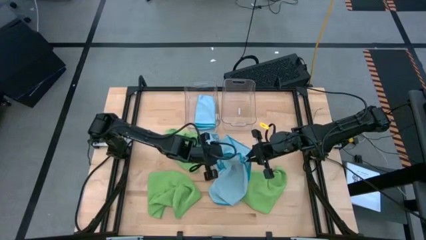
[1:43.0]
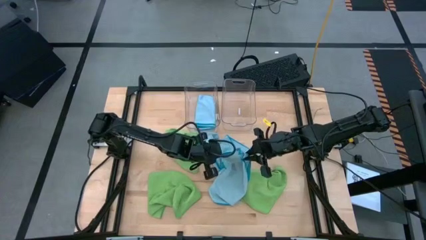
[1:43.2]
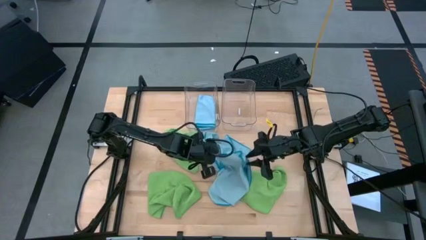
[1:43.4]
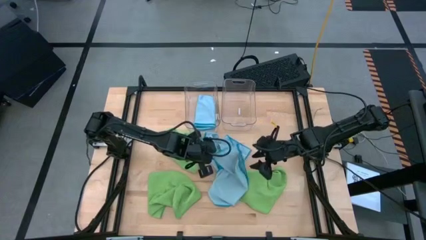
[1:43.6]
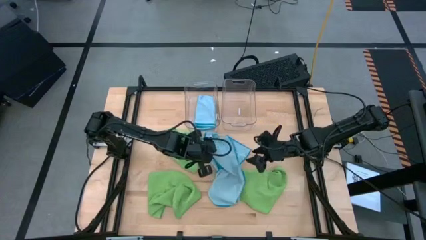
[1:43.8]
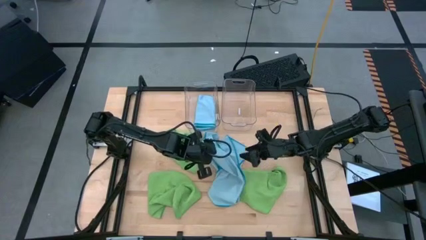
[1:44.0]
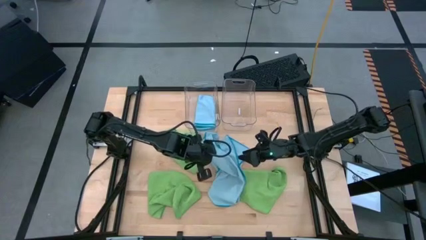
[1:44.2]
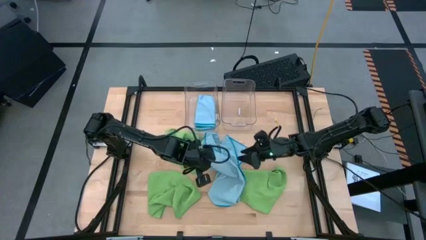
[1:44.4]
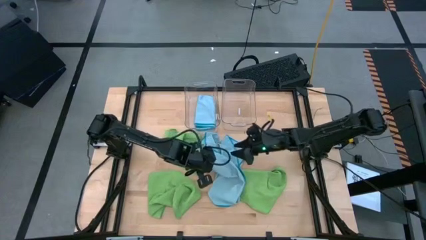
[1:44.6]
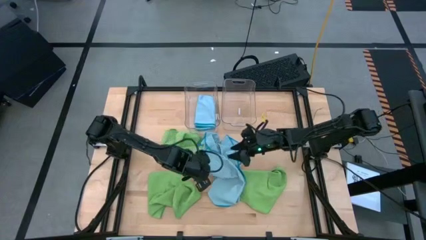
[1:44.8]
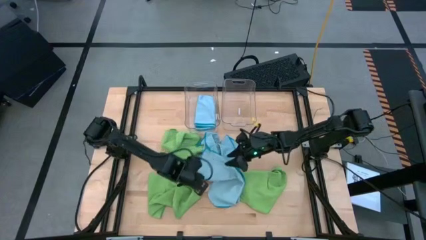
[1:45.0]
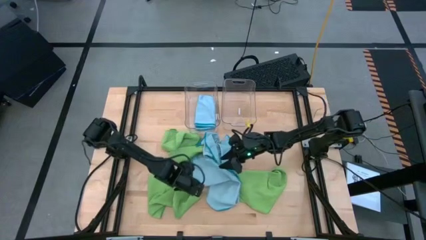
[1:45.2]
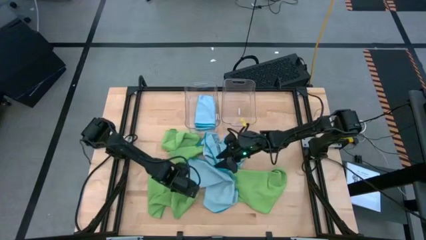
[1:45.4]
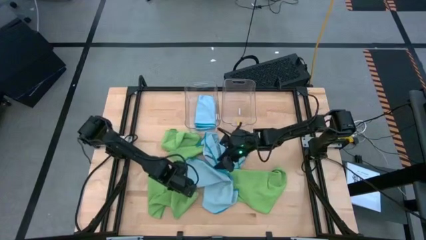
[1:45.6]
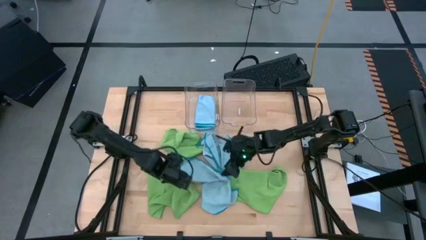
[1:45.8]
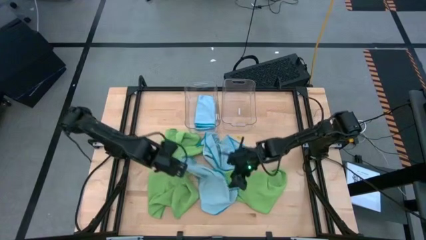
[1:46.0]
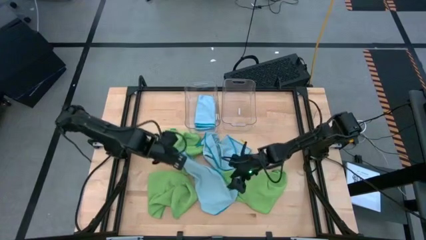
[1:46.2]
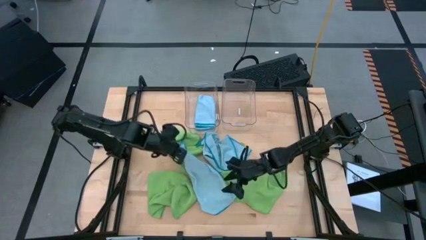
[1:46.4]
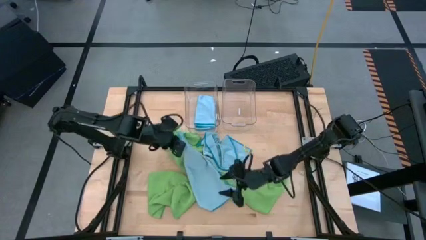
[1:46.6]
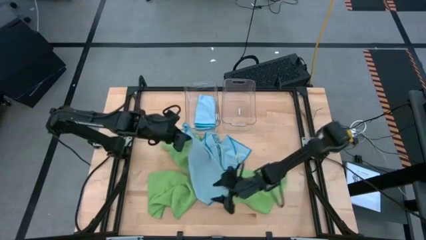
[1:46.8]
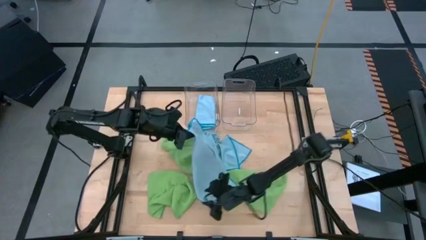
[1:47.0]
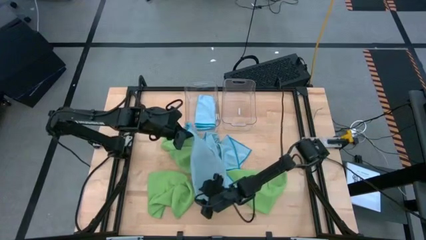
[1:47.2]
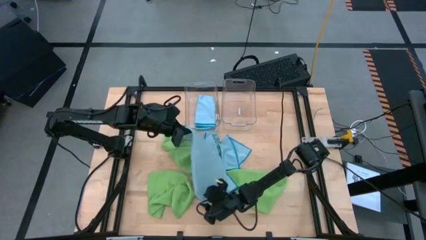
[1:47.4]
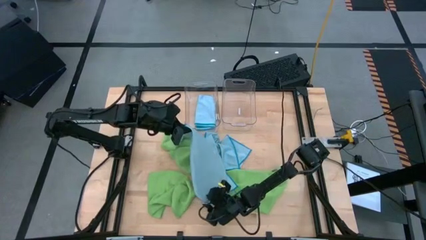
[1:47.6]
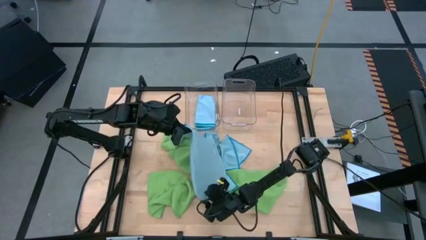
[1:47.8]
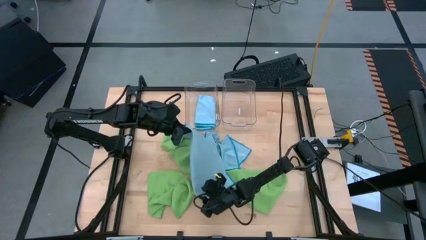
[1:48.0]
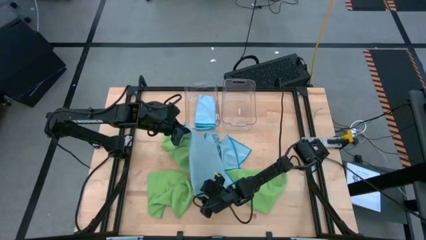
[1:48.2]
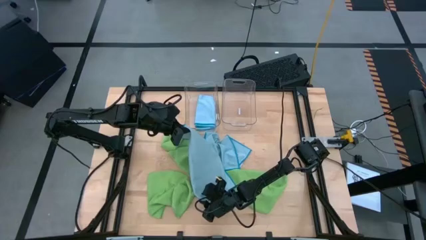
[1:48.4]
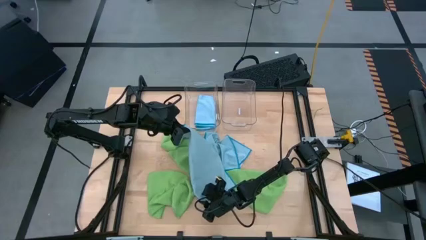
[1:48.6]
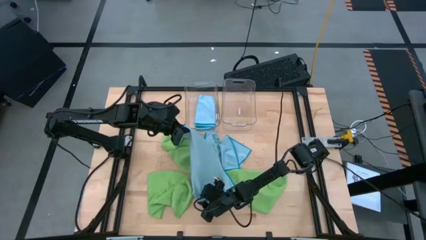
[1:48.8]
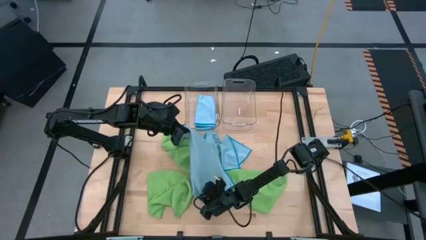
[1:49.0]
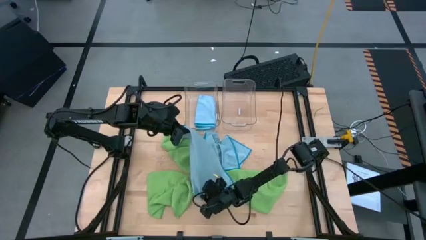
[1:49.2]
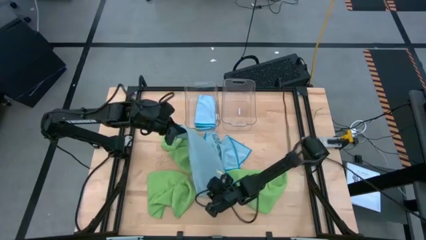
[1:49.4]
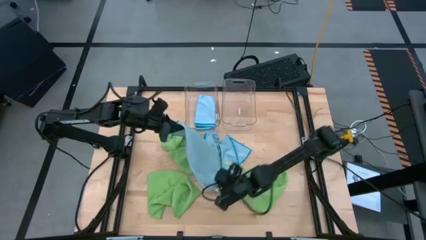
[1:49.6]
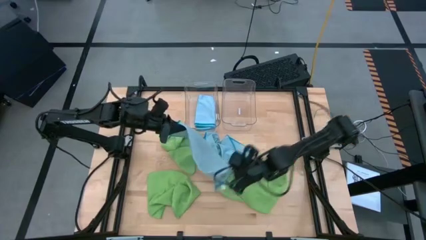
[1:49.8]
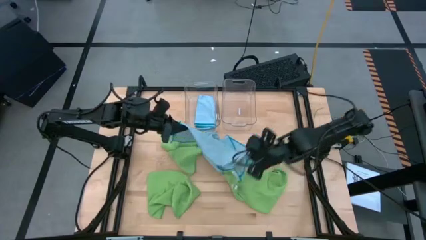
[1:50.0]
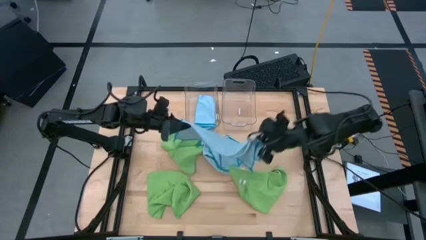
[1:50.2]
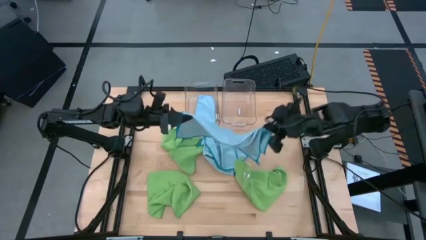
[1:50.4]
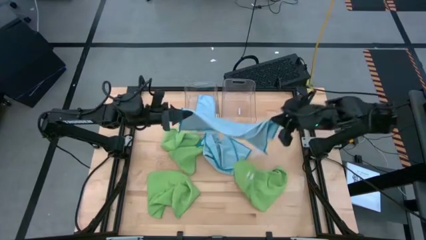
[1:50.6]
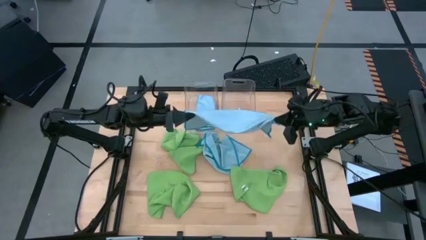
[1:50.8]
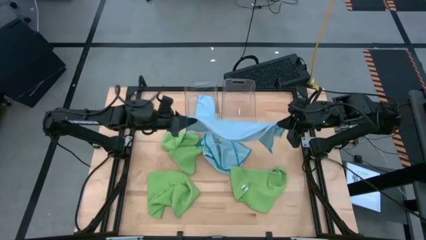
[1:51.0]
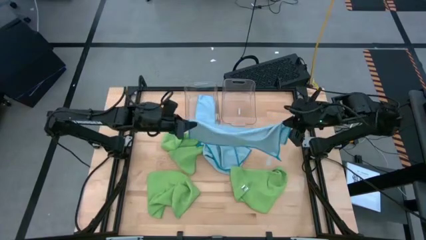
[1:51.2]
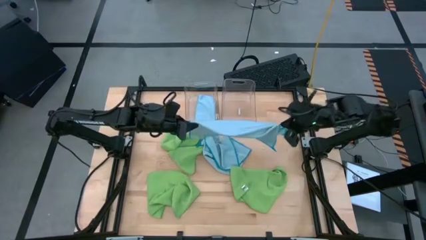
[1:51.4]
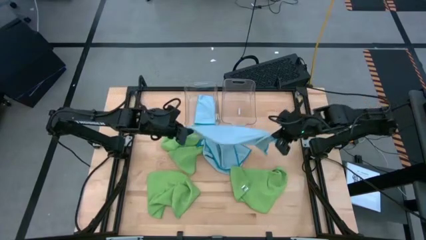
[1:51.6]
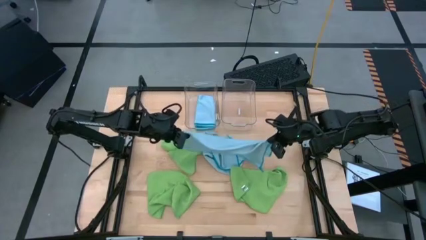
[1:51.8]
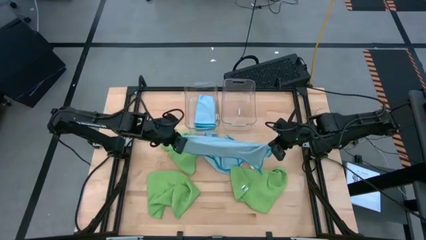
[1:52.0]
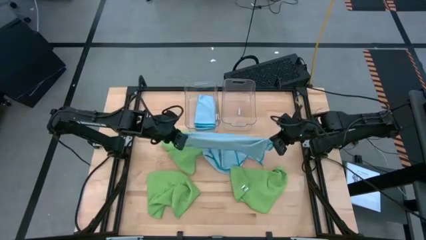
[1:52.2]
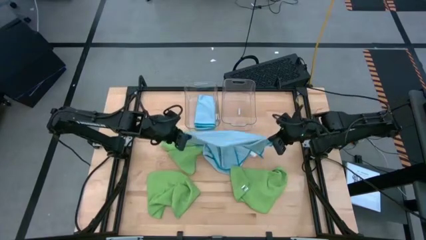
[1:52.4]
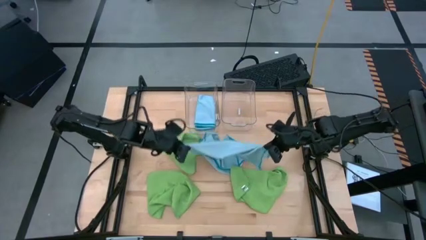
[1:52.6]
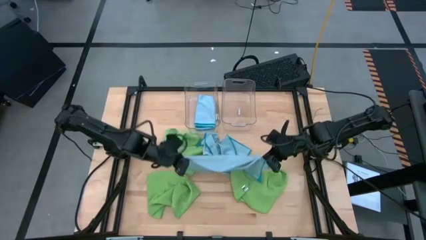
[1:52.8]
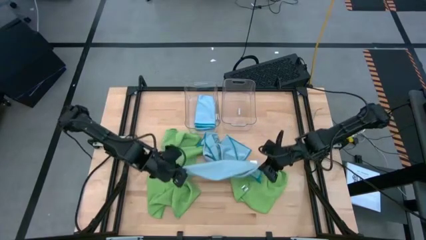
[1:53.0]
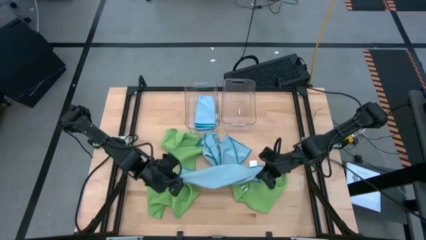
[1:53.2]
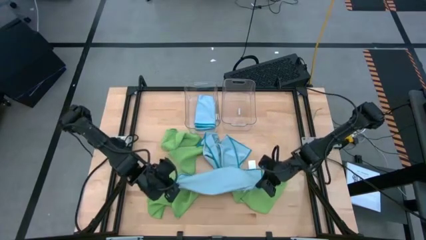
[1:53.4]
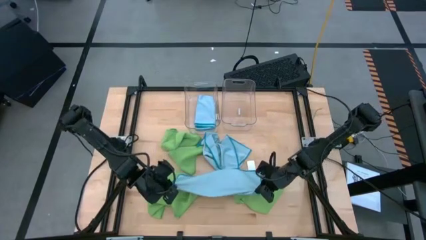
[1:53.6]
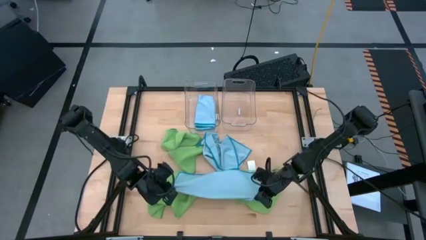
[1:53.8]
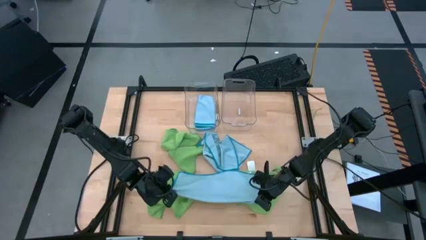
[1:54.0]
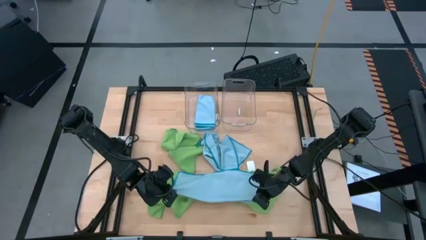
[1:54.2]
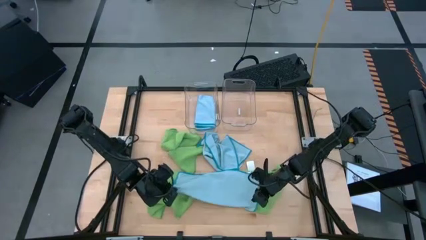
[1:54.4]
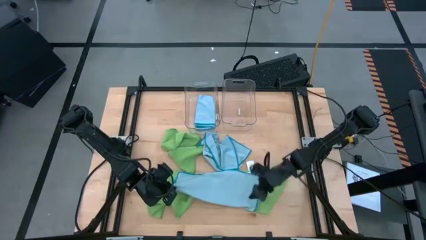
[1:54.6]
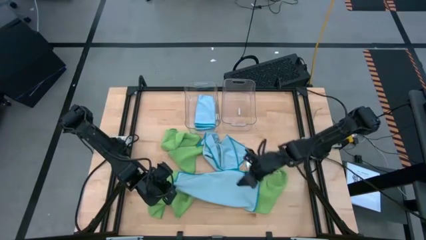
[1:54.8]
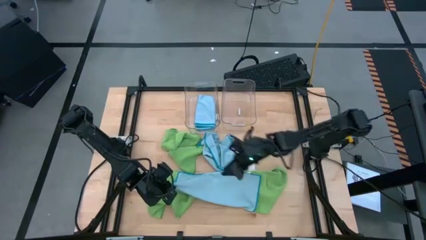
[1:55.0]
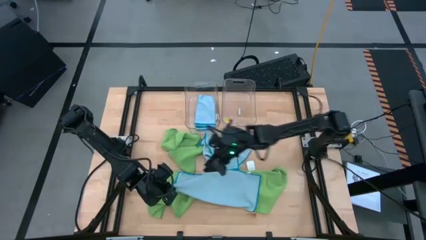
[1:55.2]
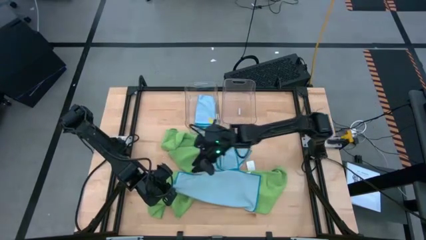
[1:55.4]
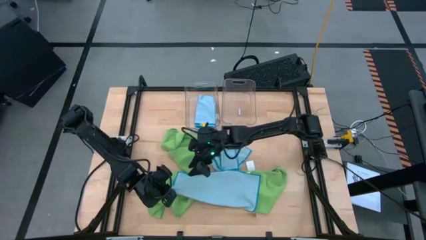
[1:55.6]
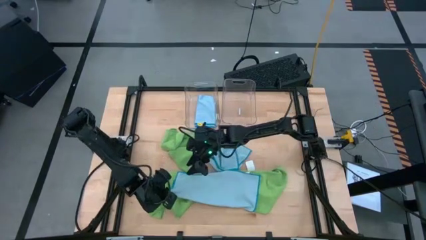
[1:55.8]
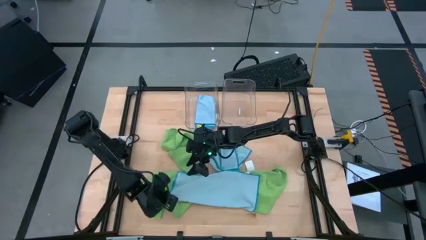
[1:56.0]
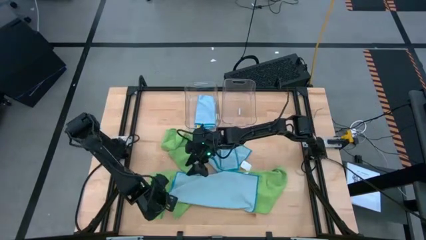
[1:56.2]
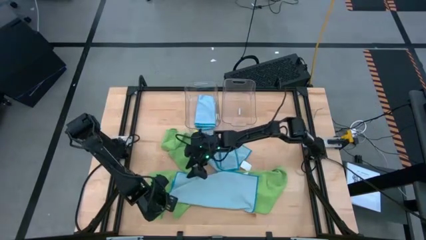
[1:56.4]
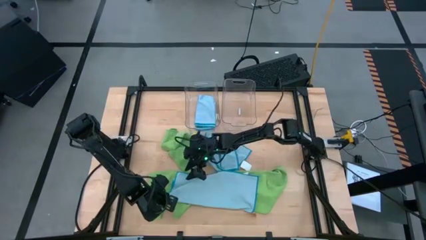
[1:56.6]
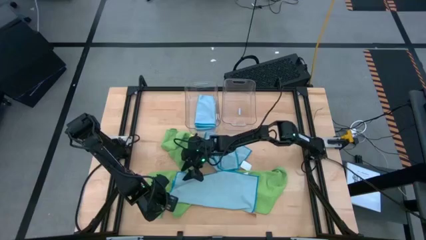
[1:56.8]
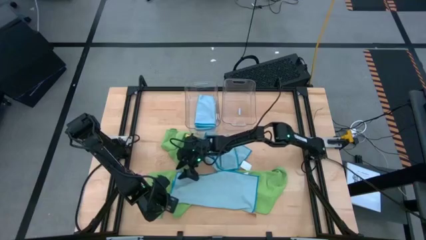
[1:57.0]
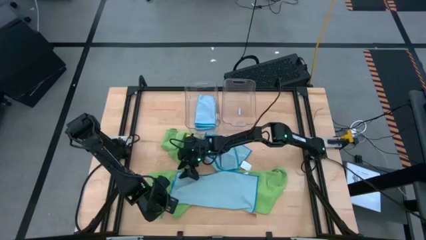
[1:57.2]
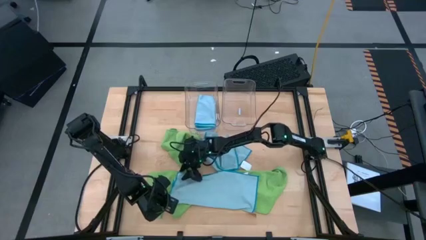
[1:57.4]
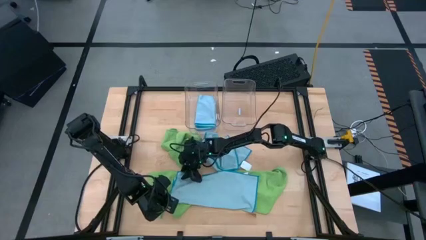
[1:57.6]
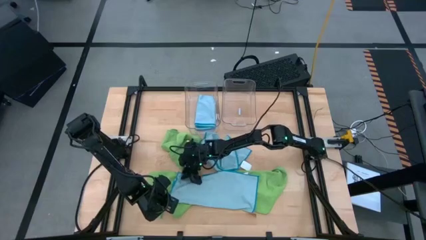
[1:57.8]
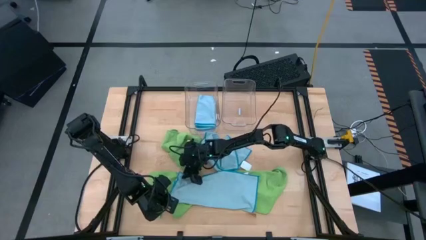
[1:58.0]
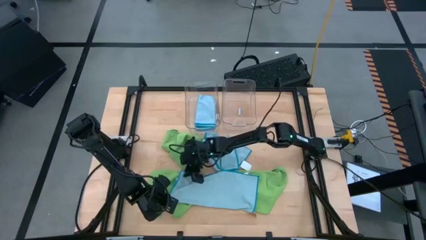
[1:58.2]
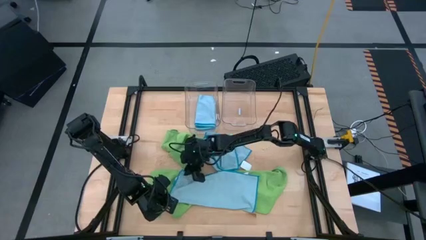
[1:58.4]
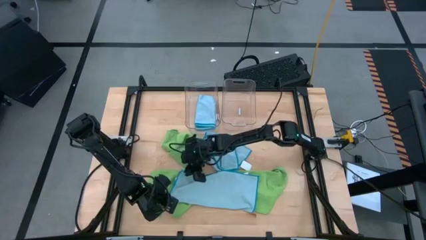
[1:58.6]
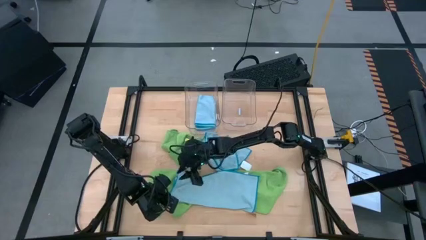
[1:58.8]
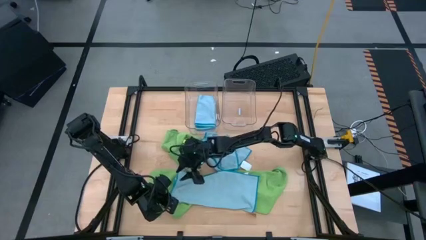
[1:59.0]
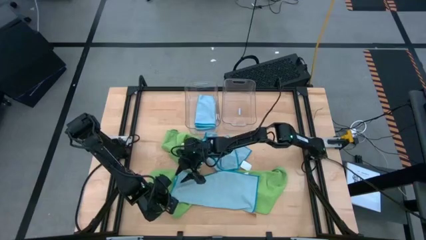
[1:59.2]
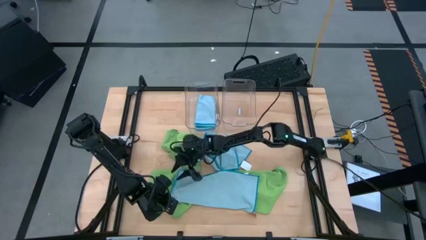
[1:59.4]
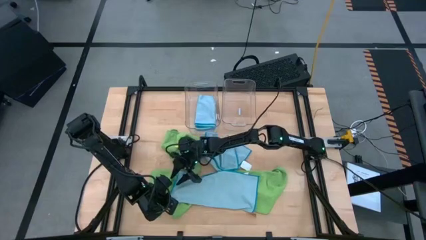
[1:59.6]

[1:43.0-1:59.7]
Task: Fold microfiber towels
Fold the bottom blue microfiber towel
